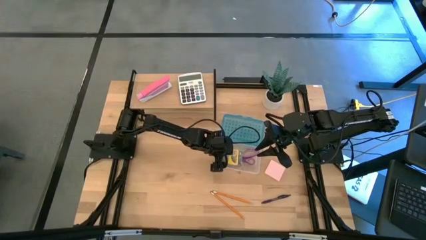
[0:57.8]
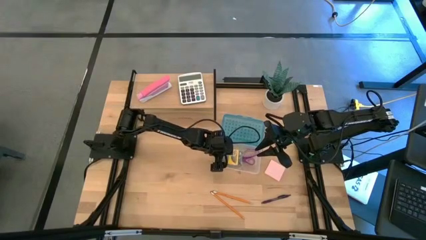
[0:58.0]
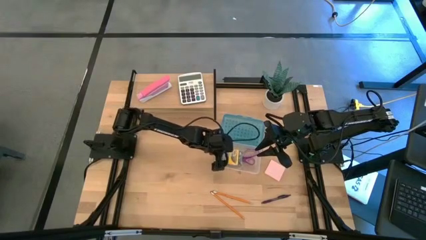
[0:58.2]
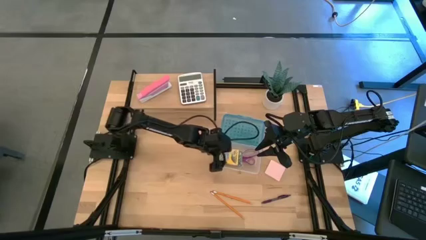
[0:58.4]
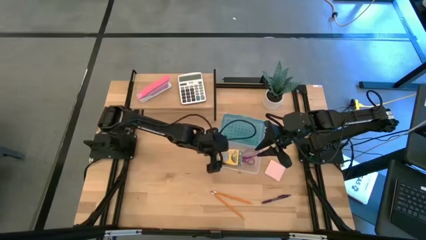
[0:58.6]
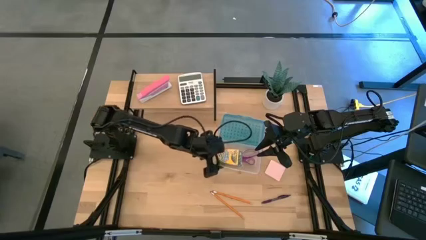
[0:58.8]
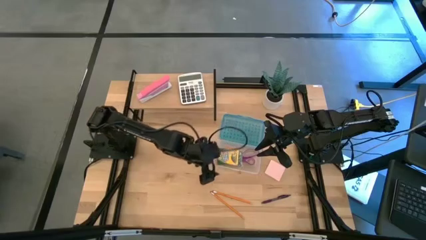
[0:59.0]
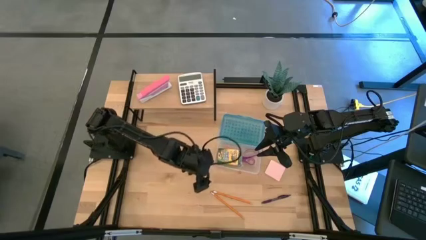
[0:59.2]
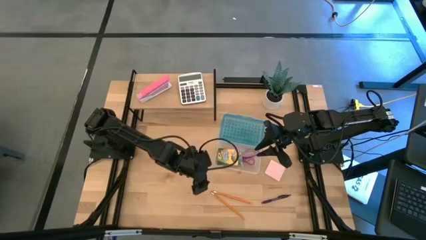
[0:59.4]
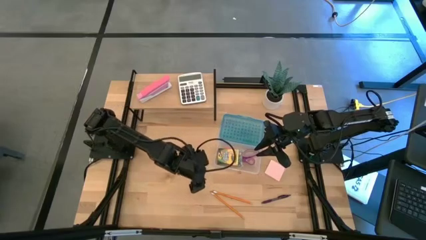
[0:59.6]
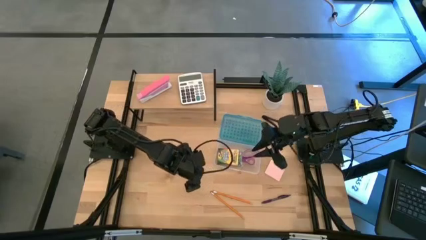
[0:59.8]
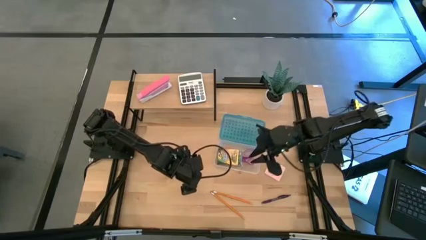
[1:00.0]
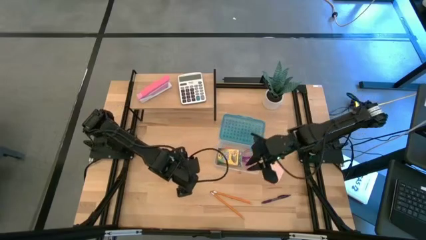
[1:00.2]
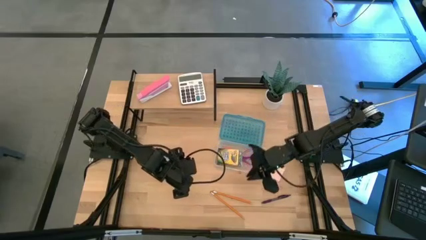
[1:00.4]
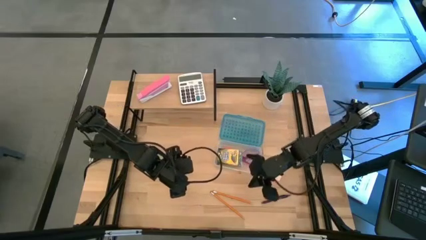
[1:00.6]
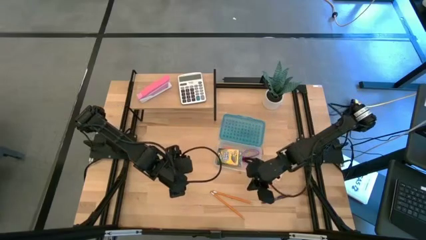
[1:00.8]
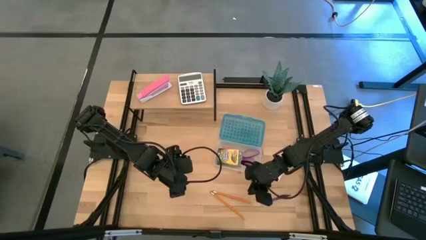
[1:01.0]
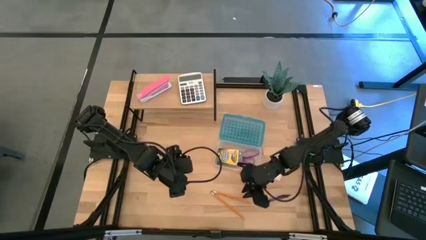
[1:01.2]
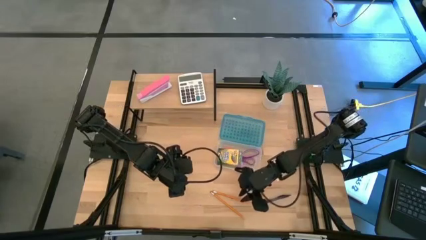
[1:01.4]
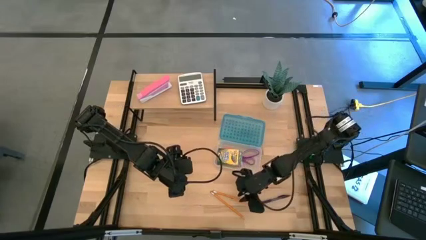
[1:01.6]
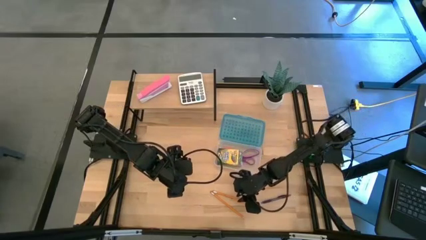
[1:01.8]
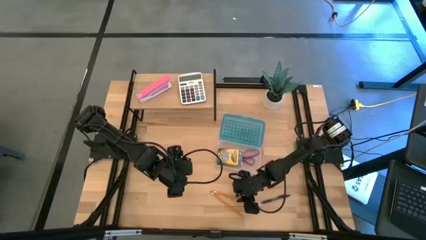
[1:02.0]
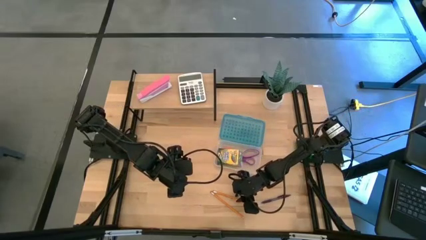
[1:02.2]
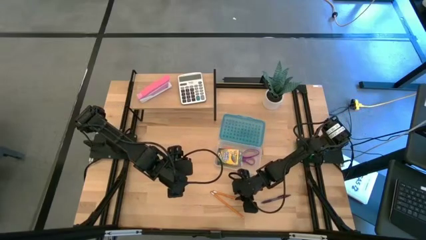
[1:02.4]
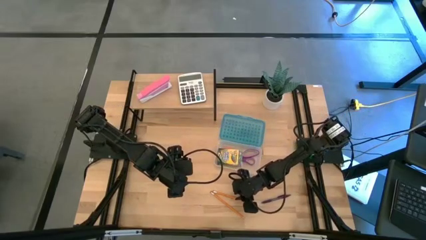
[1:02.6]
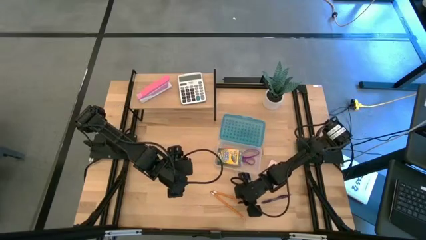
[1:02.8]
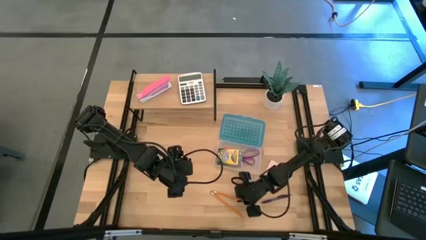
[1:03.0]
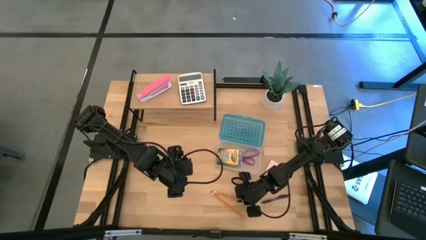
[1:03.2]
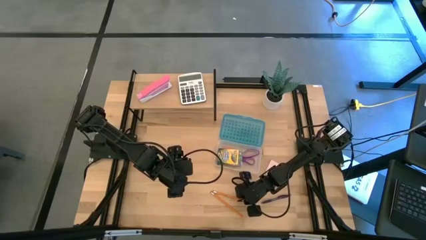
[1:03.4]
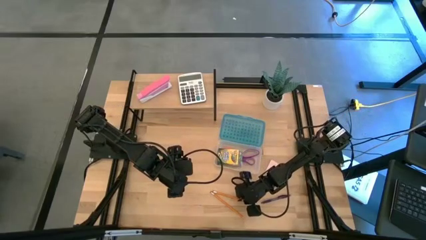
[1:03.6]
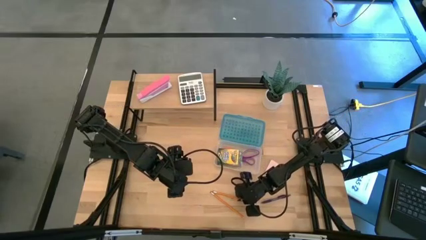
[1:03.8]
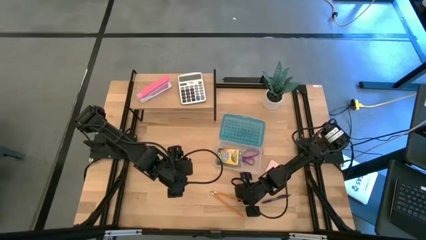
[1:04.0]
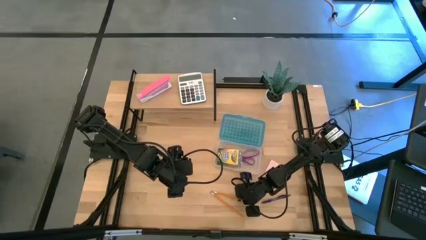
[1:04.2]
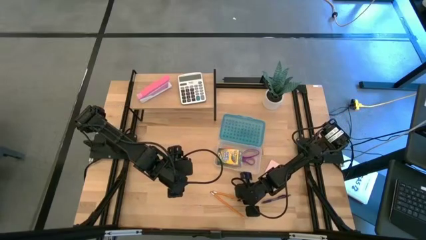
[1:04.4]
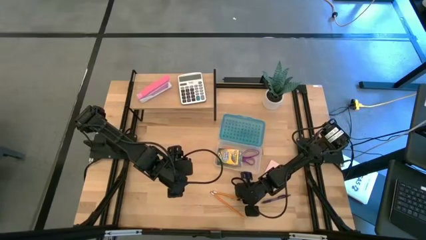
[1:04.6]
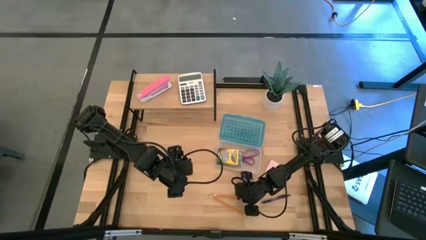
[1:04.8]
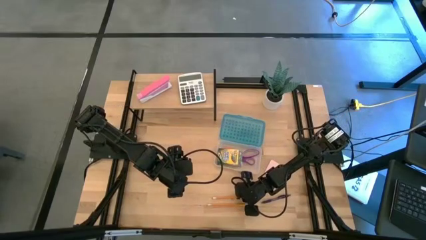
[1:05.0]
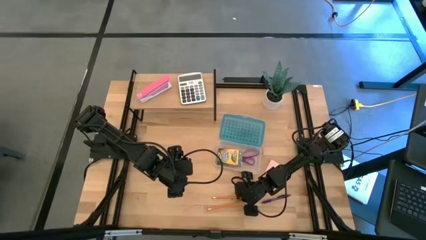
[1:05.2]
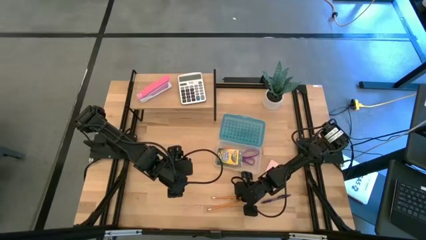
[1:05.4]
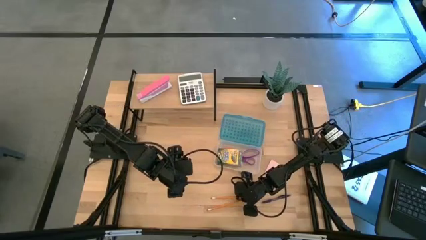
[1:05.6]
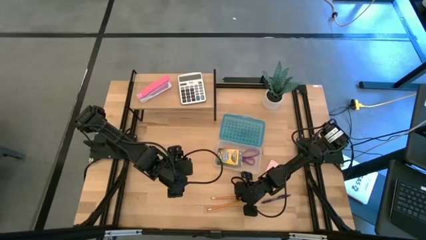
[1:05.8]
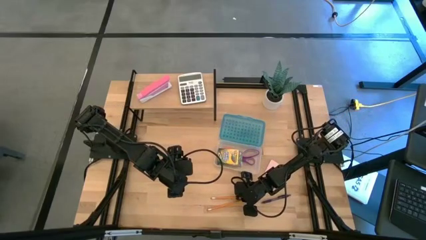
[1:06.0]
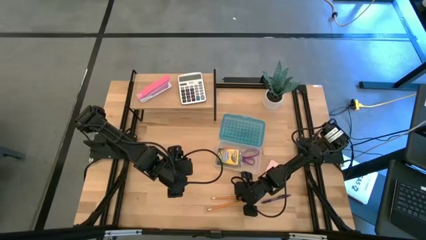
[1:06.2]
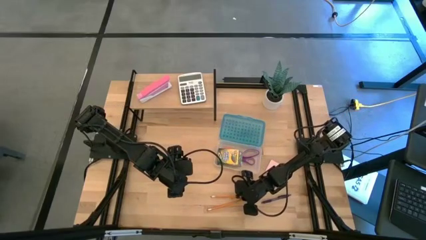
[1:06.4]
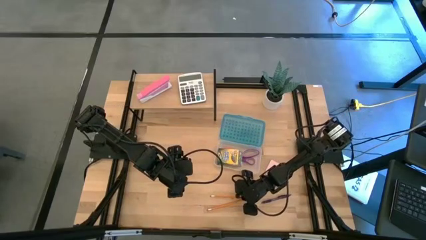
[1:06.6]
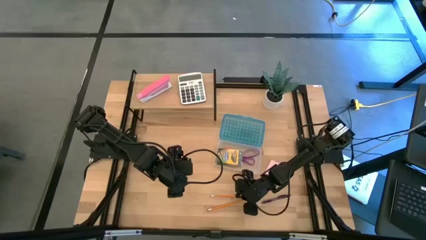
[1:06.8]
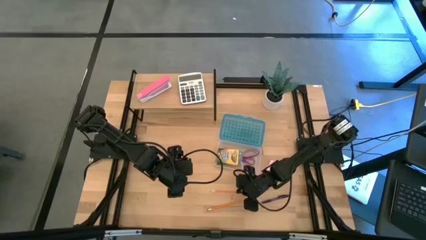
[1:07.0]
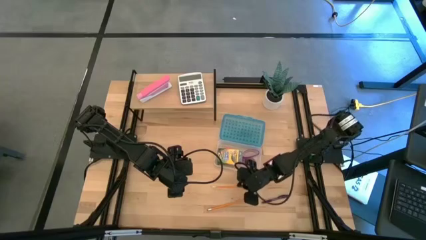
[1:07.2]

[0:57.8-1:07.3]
Task: Pack school essentials
Put the top pencil into the supply box

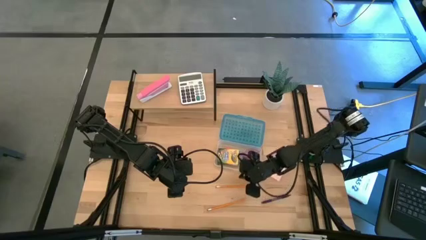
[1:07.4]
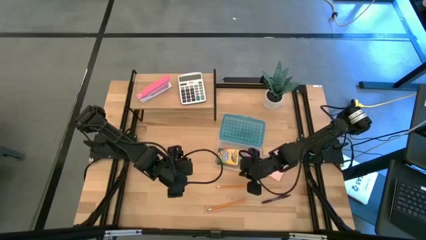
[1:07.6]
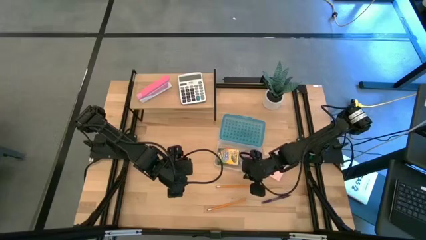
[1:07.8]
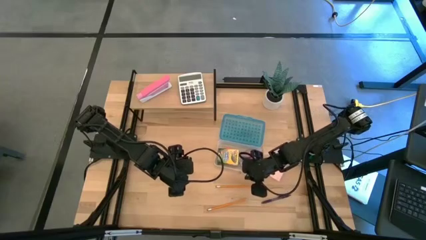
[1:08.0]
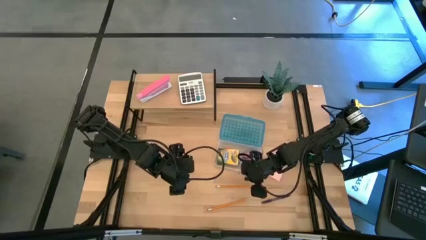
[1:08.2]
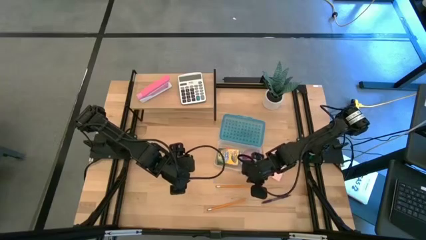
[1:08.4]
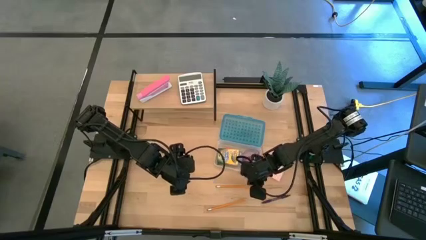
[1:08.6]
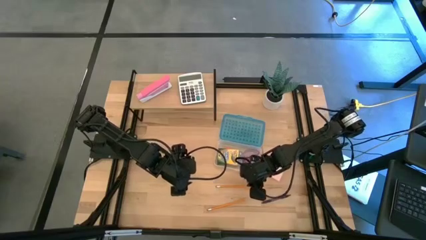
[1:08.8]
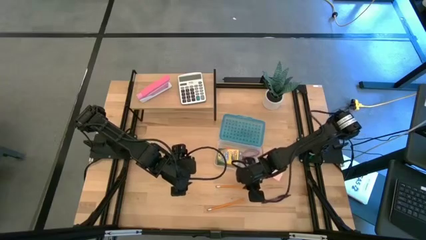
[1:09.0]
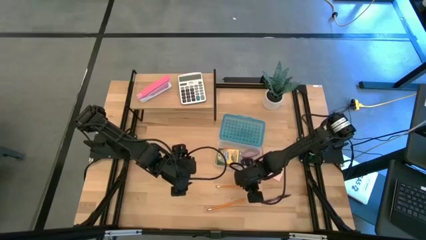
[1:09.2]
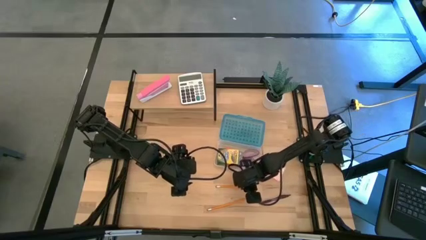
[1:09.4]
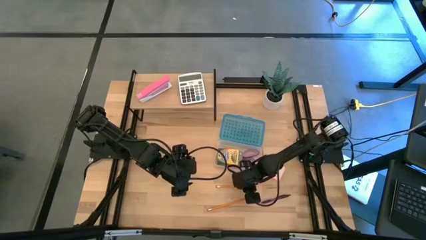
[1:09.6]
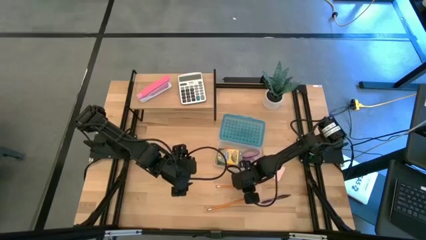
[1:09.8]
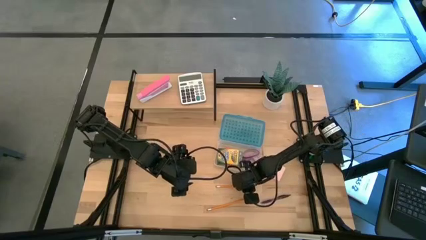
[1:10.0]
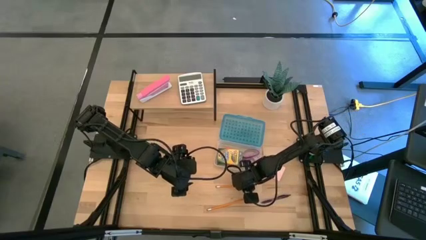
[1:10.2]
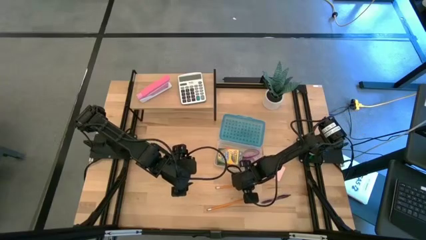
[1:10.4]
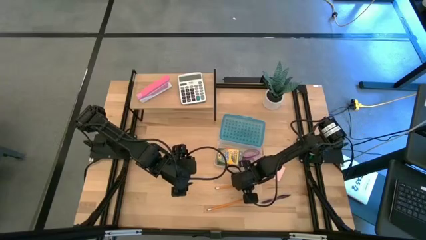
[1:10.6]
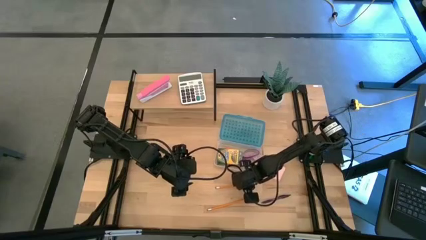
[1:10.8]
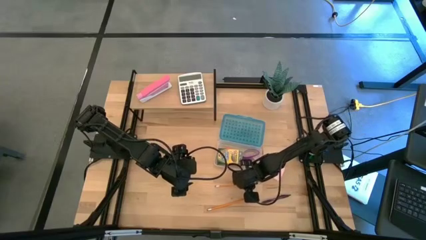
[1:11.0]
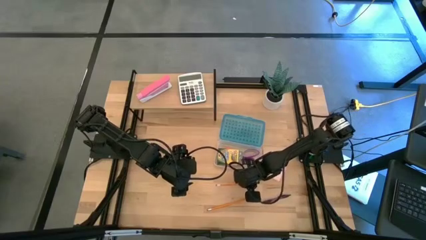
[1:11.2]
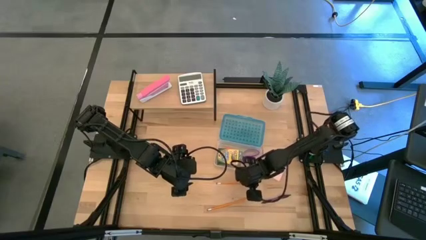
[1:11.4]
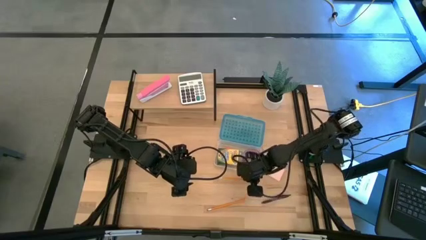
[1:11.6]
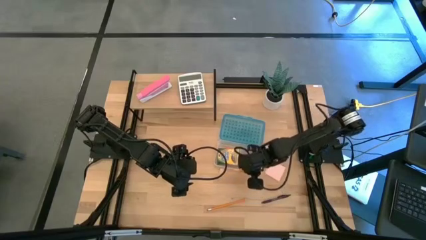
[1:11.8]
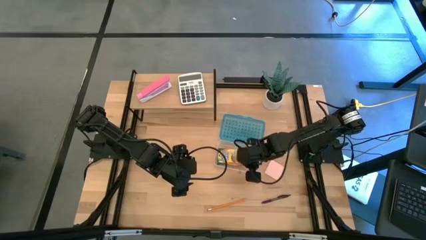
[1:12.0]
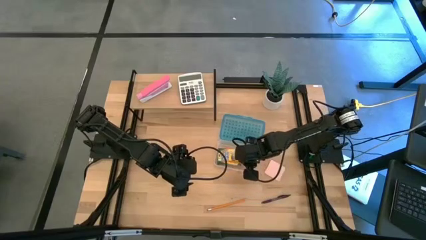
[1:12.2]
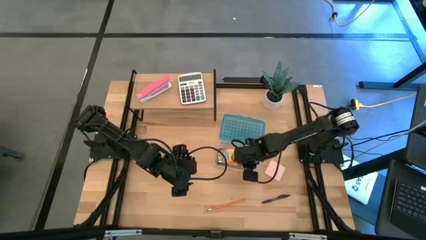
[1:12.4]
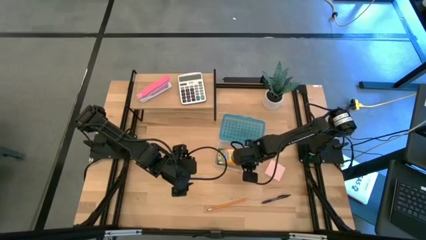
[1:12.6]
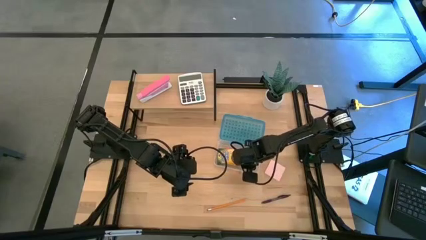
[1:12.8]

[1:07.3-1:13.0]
Put the top pencil into the supply box

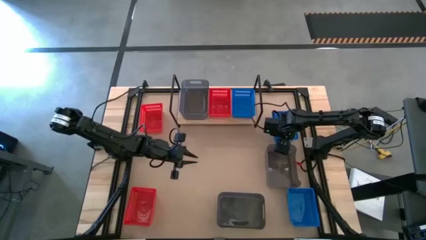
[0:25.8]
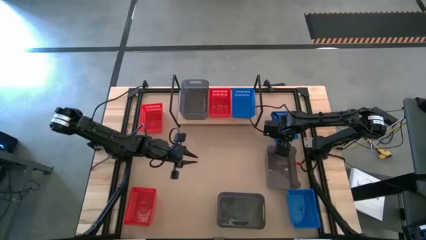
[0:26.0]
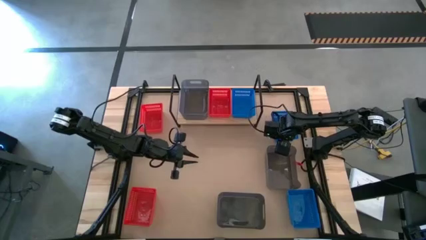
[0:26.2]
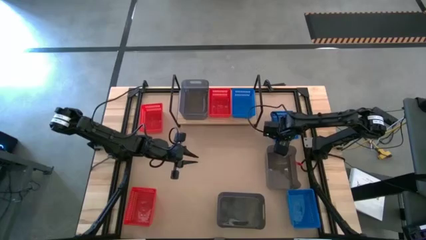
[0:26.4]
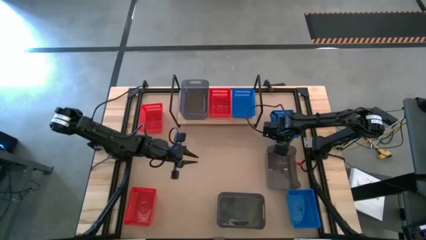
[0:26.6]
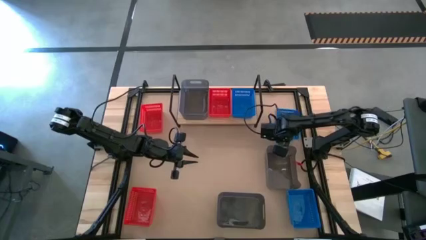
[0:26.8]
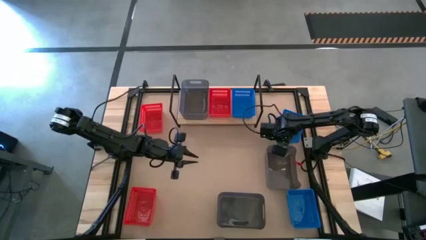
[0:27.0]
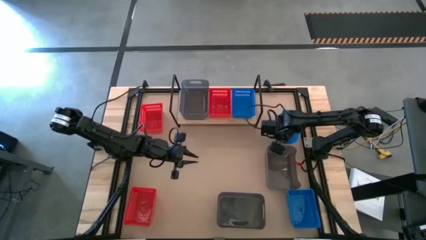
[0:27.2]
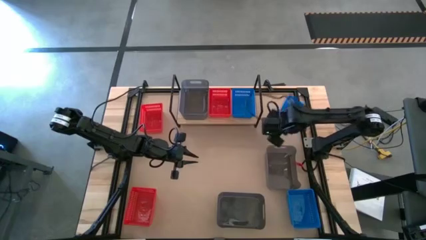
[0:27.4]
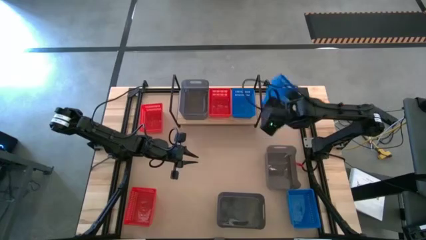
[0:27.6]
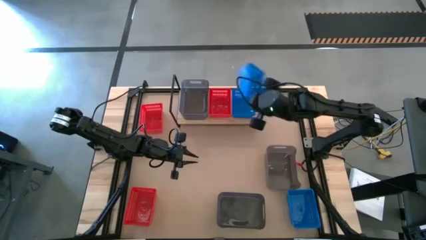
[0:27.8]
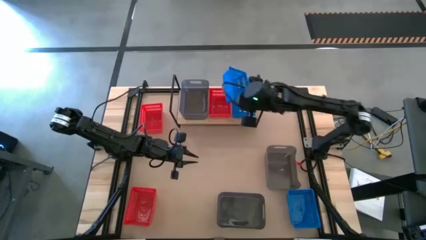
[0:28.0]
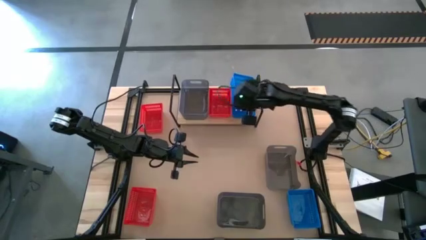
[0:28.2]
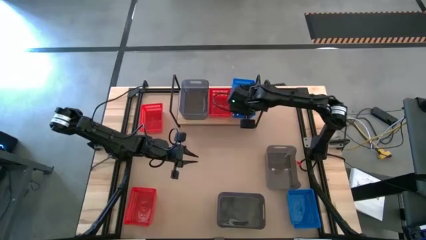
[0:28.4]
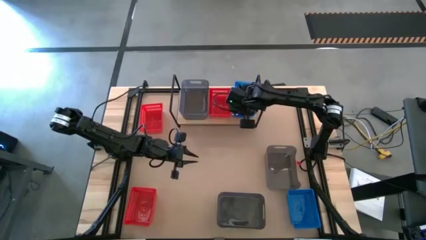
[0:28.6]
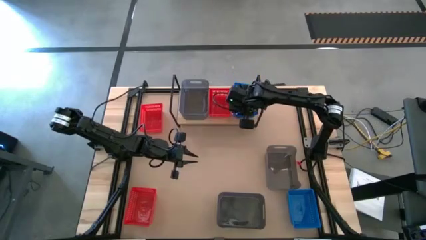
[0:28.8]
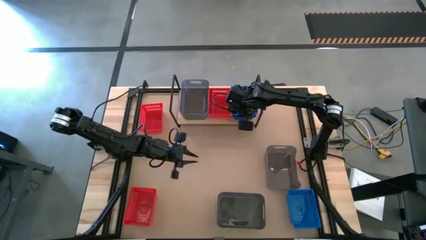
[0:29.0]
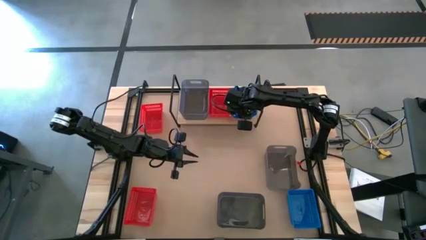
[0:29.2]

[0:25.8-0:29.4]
Task: Stack baskets on shelf by color
Stack the top blue bin on the other blue bin on the shelf
